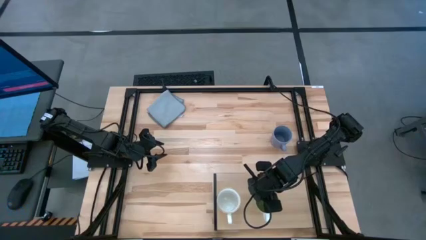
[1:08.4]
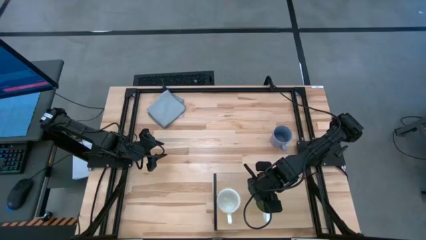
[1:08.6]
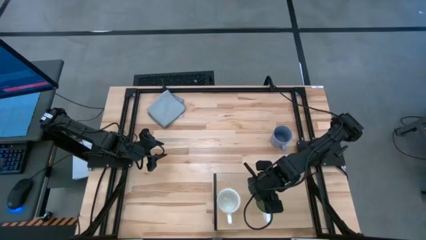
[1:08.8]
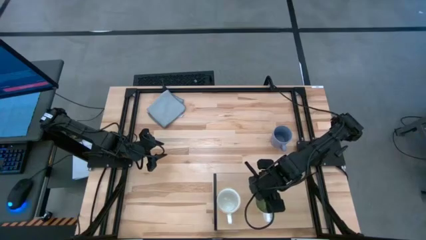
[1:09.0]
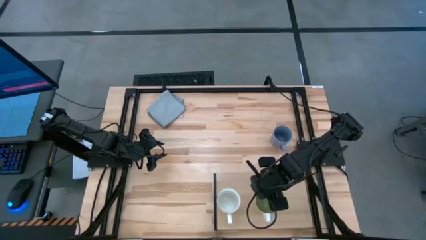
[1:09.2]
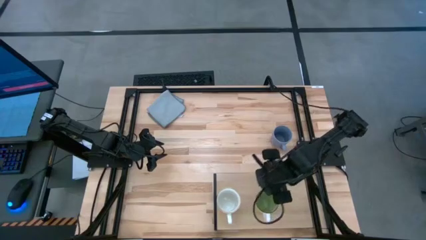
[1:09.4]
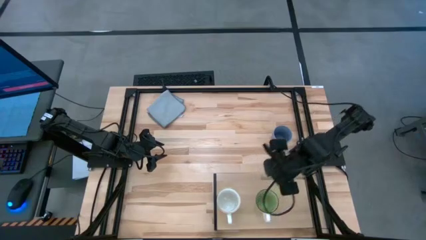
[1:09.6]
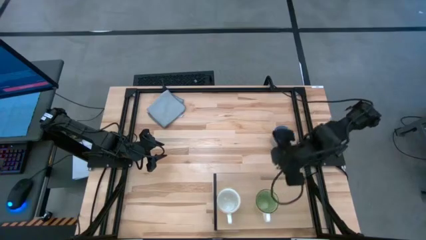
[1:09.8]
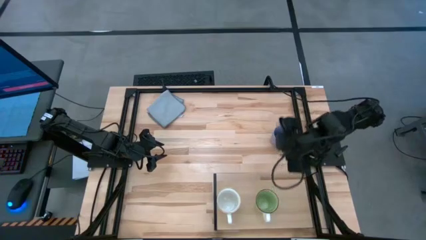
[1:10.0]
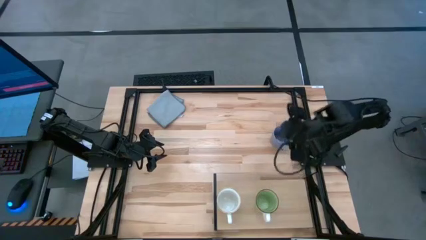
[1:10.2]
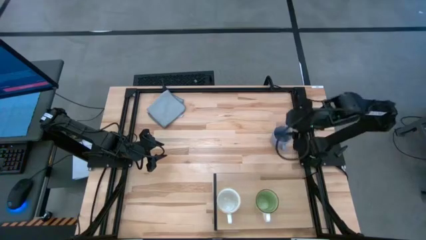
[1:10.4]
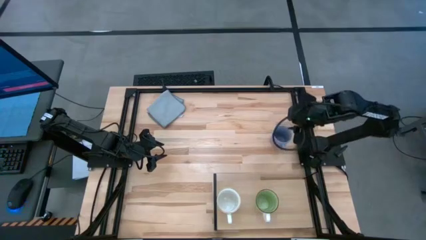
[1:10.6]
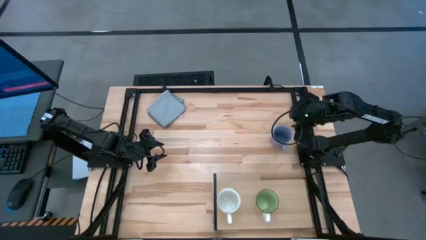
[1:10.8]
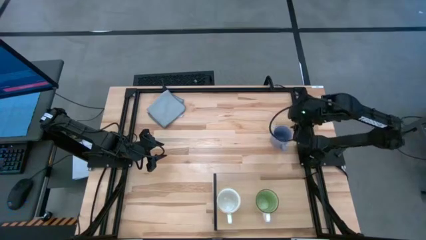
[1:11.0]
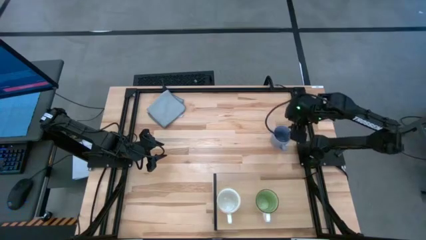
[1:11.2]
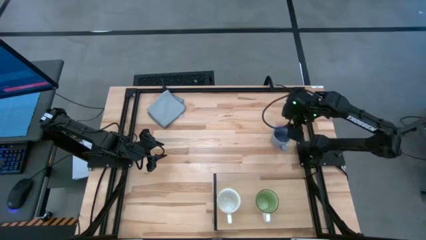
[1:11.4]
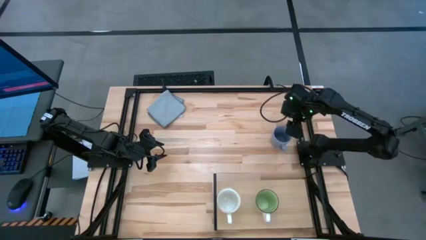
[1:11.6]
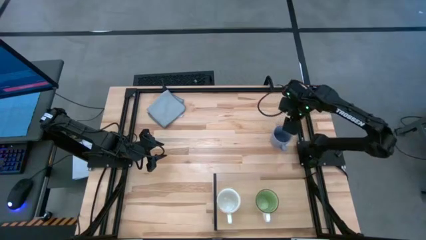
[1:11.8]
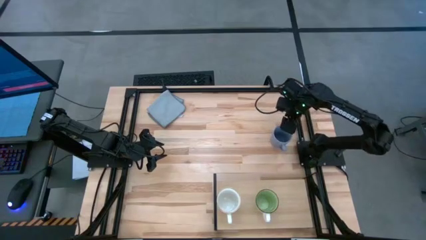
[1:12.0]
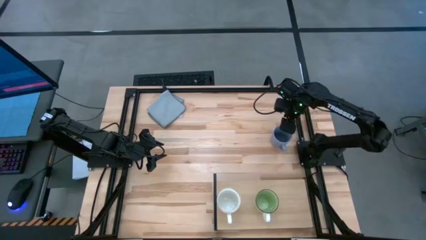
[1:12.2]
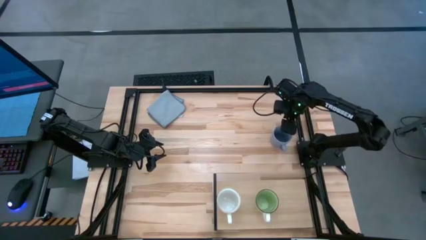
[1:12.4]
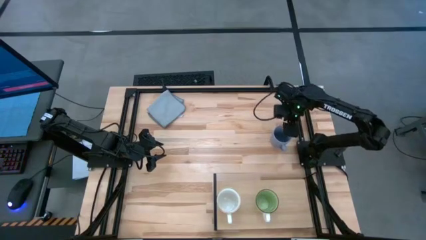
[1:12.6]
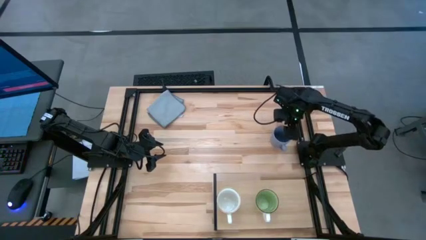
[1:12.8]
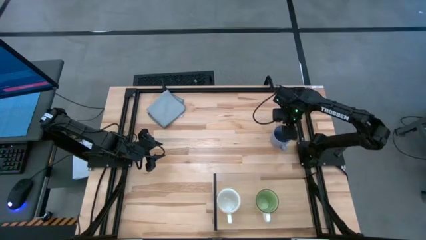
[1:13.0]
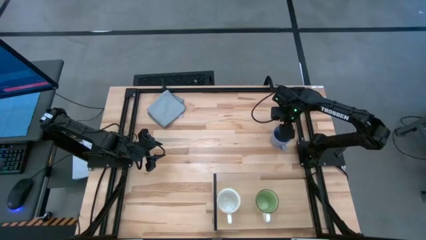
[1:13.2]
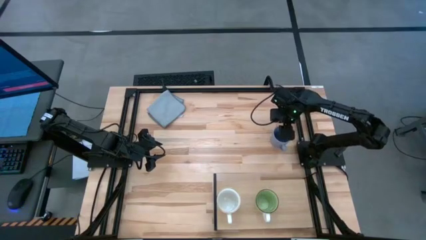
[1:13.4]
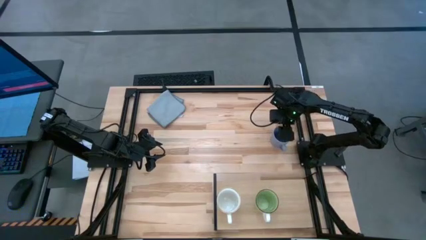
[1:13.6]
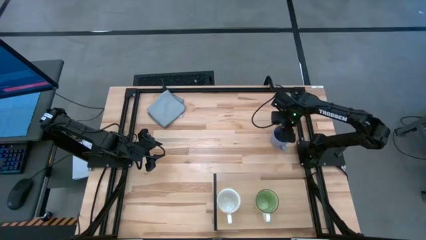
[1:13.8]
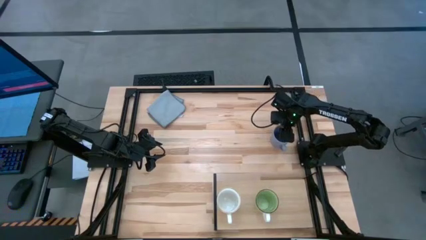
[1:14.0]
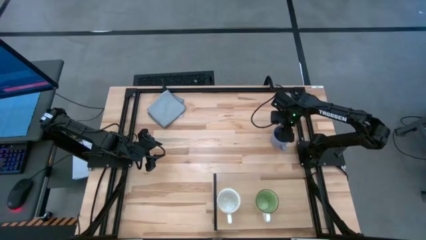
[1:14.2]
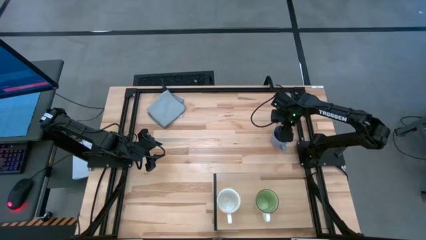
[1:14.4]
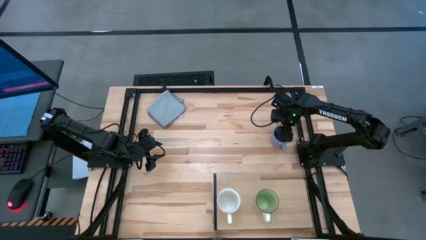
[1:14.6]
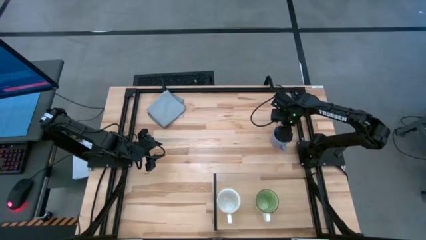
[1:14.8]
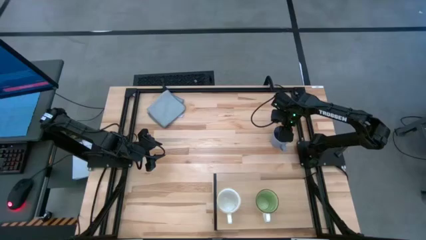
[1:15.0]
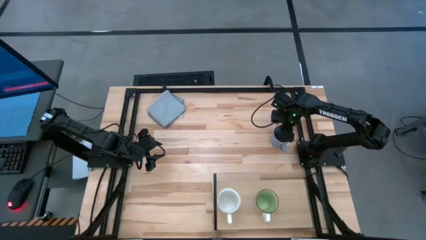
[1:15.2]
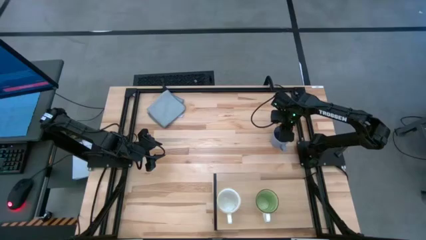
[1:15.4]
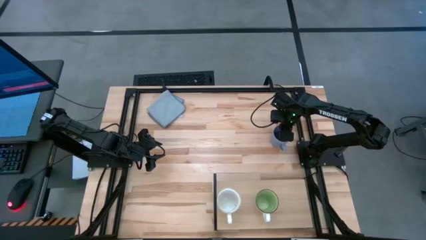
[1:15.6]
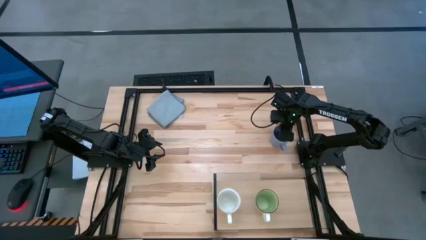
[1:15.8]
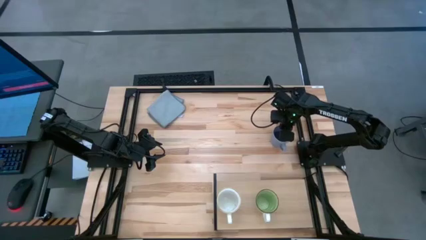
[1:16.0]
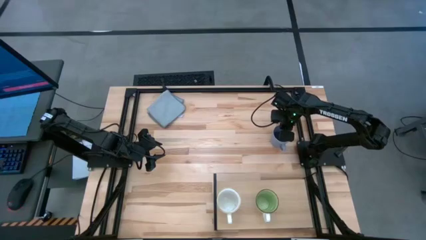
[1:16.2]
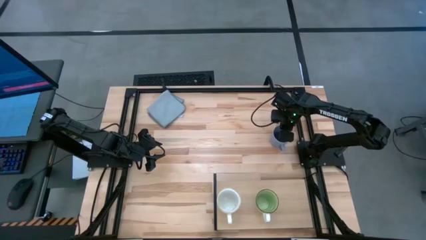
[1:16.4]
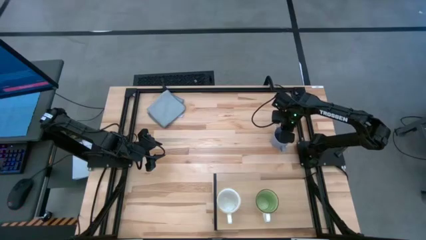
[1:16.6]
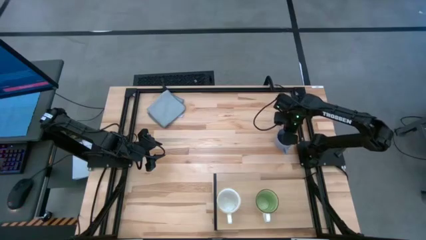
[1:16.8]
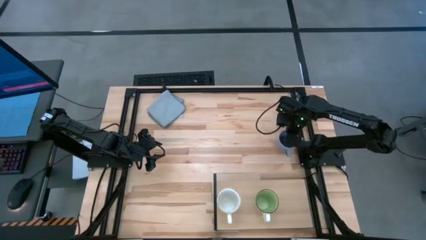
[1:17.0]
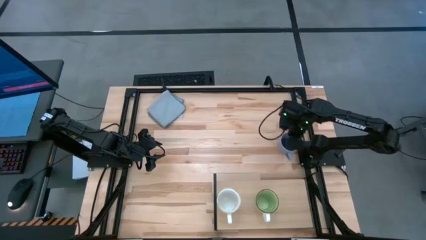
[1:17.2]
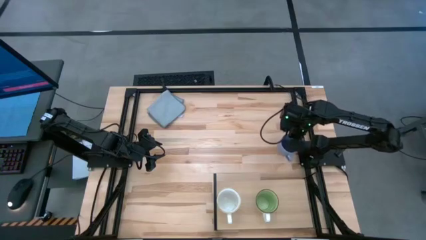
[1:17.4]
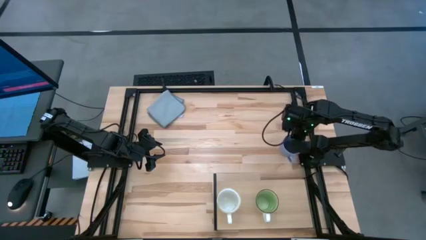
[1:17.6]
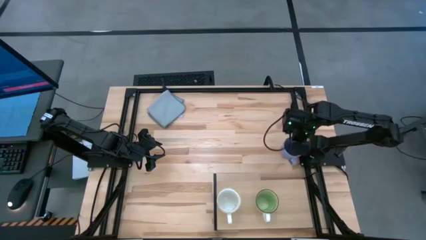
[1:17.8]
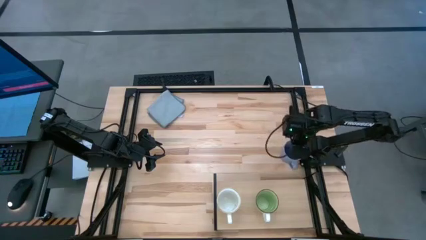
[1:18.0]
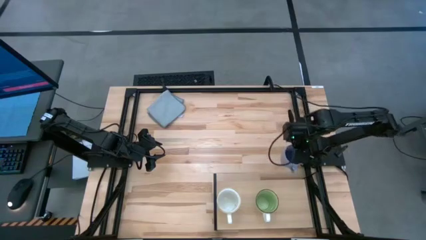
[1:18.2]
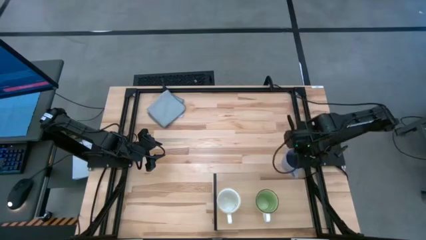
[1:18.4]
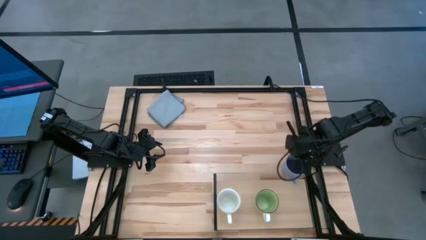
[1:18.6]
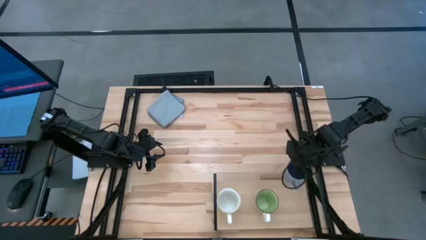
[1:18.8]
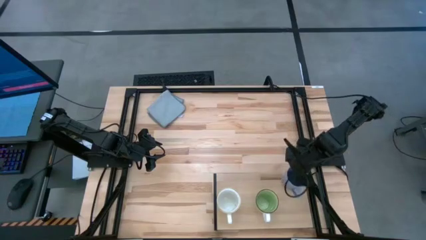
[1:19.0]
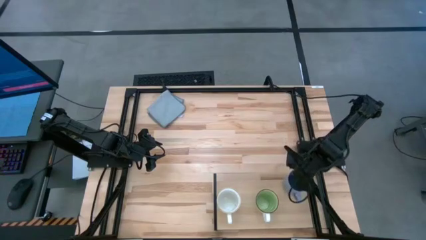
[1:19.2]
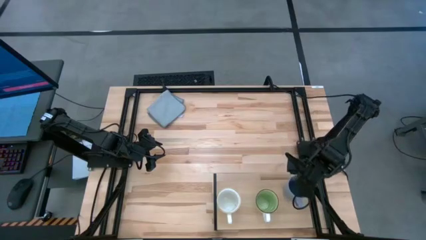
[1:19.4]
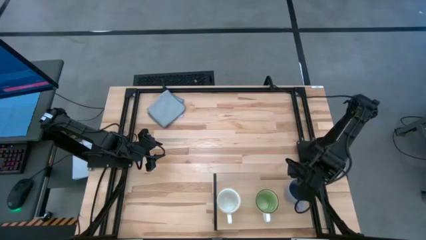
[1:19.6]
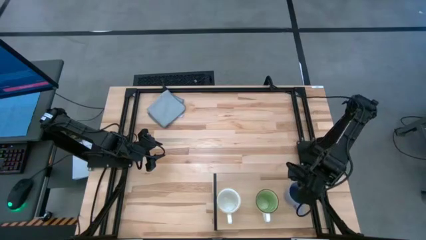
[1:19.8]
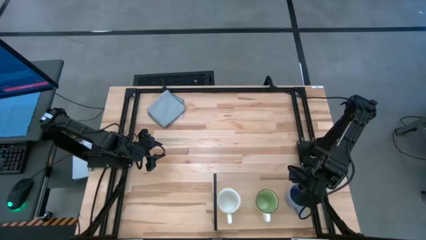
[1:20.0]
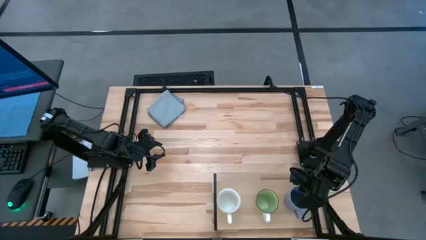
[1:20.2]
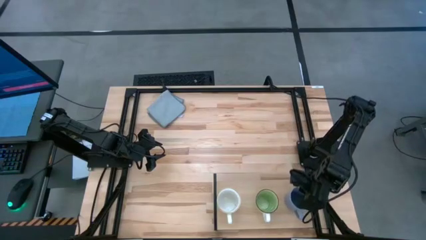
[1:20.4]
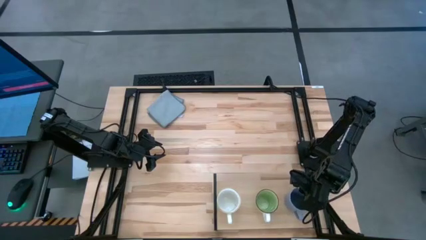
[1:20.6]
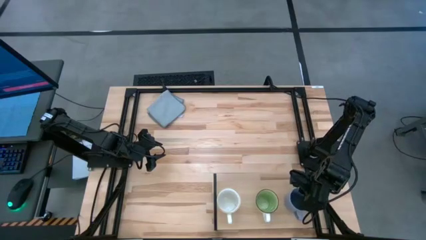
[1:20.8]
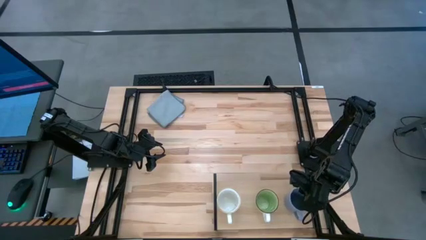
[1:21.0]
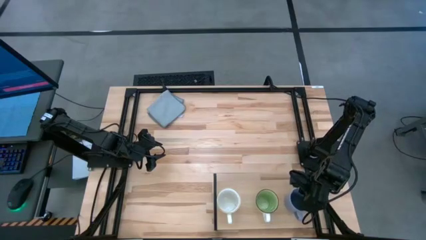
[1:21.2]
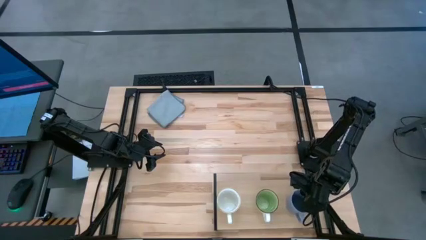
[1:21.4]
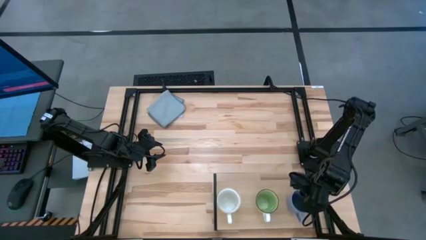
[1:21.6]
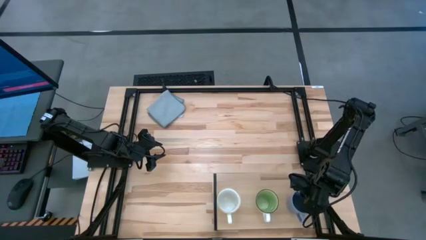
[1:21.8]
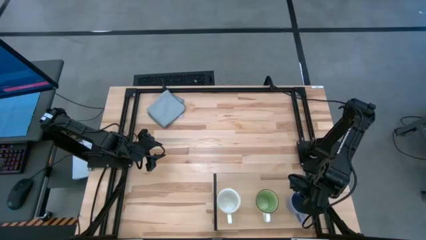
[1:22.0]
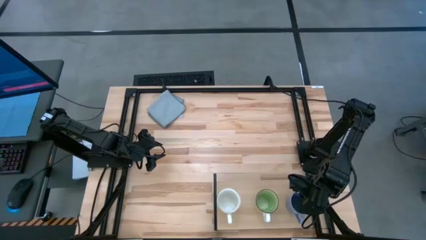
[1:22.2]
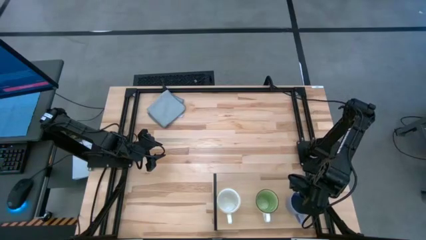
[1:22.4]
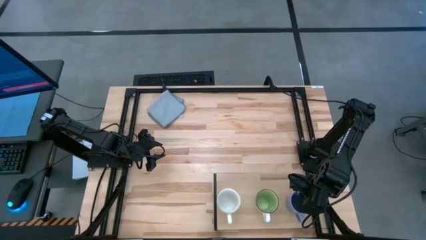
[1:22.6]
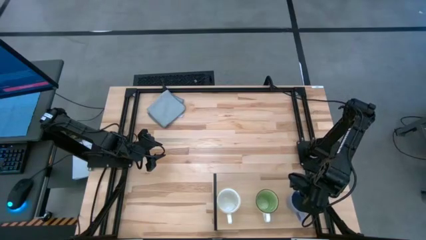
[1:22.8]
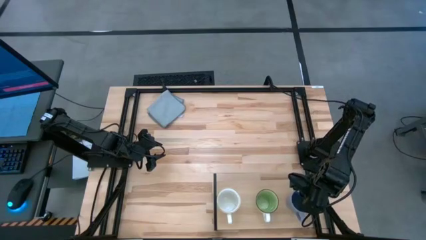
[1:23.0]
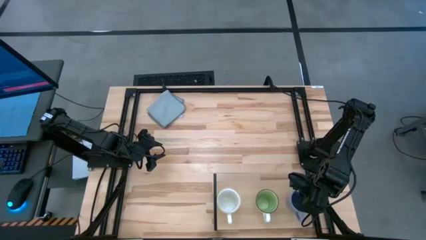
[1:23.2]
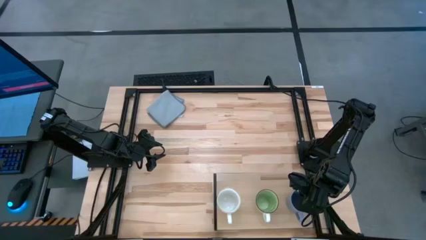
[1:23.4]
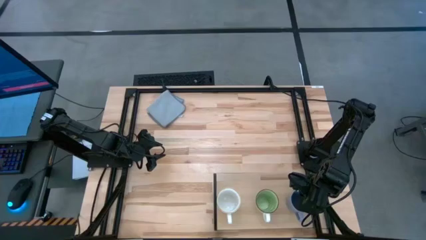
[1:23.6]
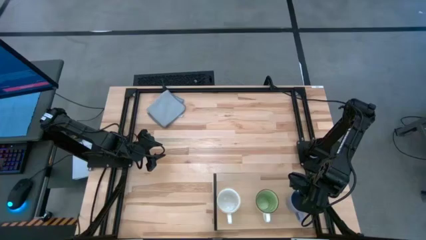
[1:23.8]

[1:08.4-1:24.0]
Task: Stack small to large cups/mugs on shelf
Put the blue cup on the shelf
